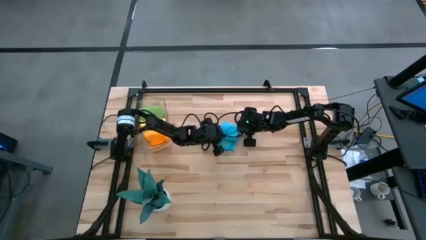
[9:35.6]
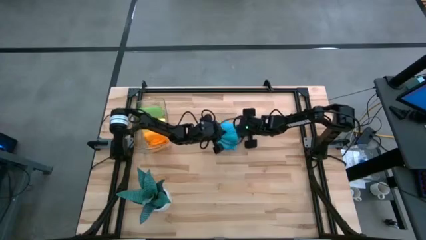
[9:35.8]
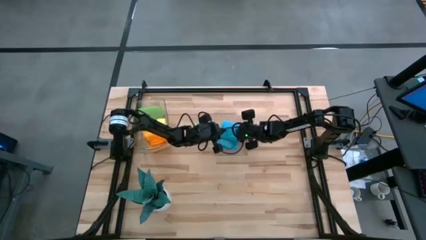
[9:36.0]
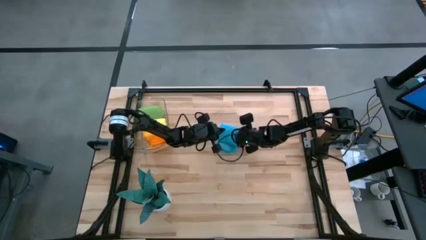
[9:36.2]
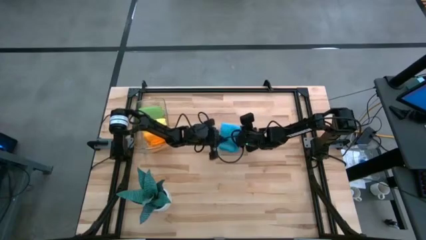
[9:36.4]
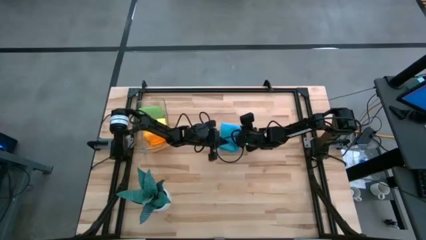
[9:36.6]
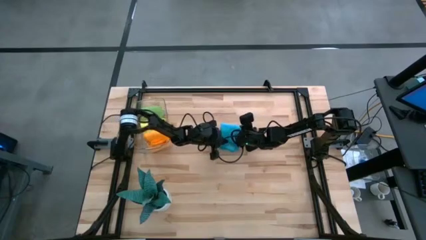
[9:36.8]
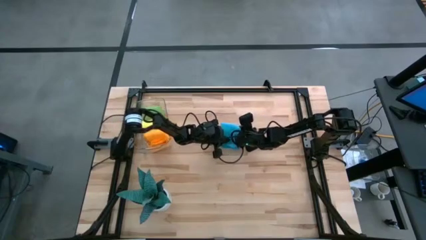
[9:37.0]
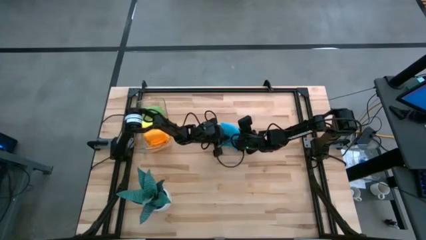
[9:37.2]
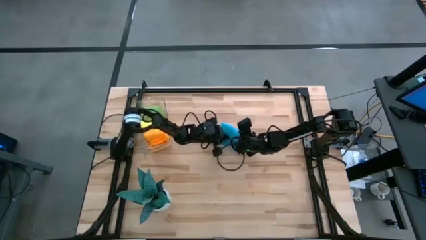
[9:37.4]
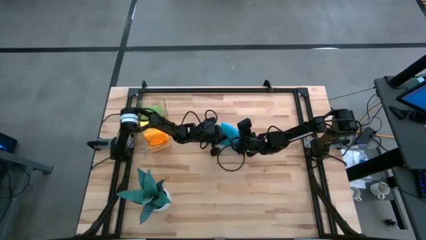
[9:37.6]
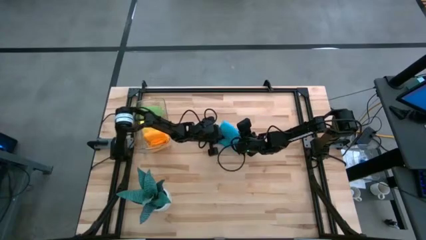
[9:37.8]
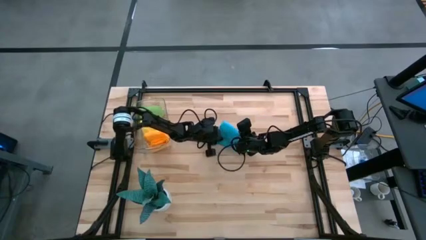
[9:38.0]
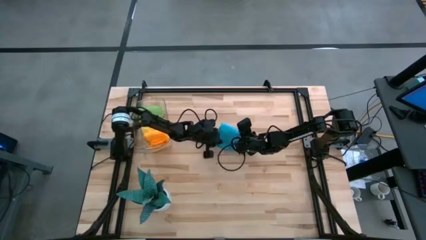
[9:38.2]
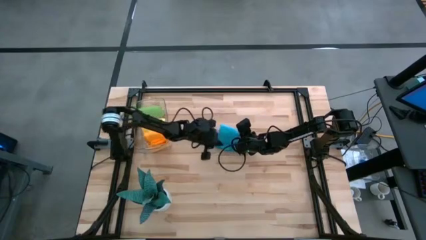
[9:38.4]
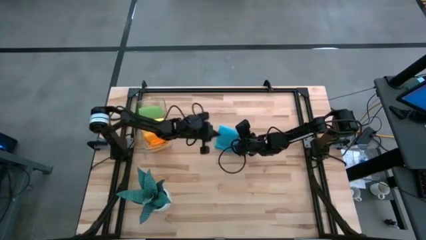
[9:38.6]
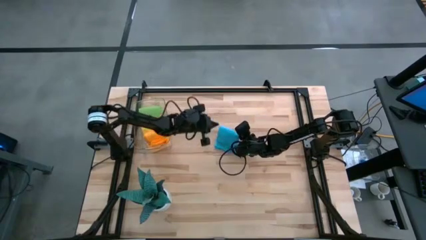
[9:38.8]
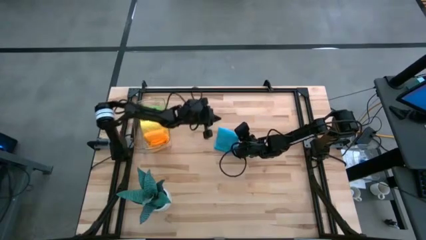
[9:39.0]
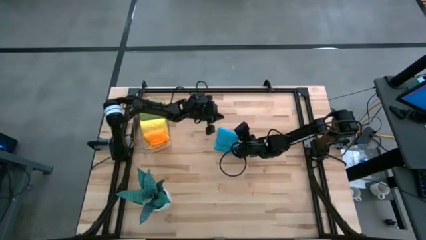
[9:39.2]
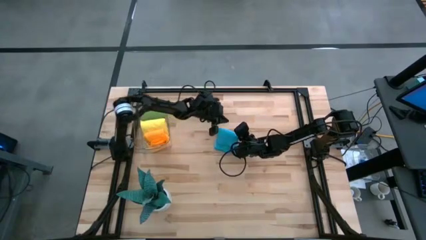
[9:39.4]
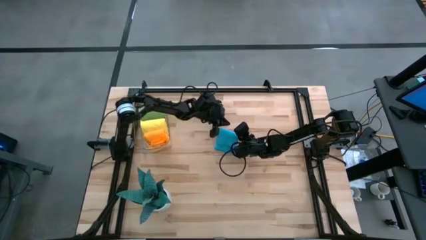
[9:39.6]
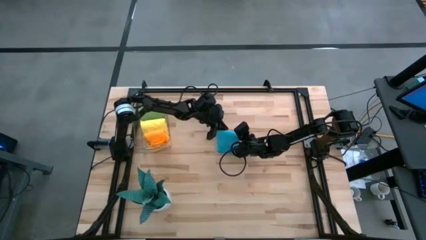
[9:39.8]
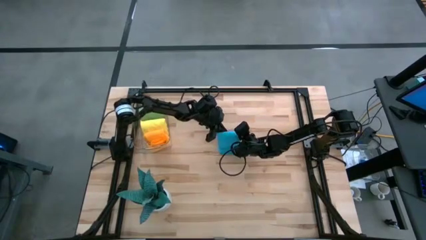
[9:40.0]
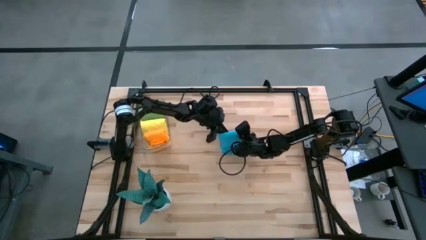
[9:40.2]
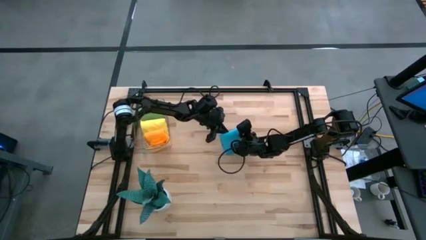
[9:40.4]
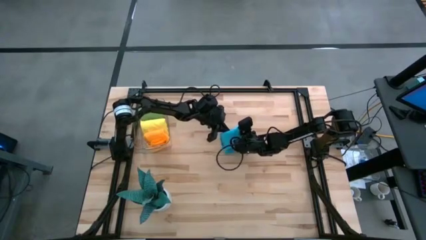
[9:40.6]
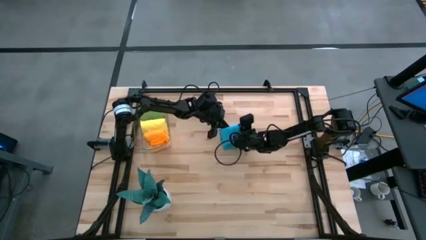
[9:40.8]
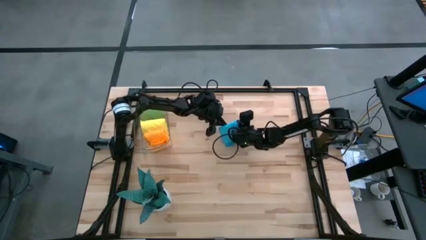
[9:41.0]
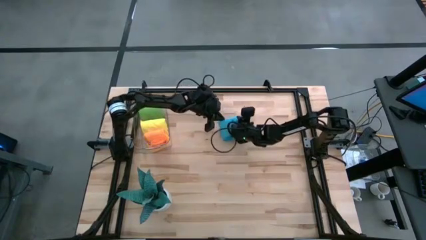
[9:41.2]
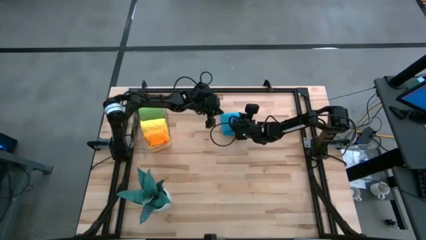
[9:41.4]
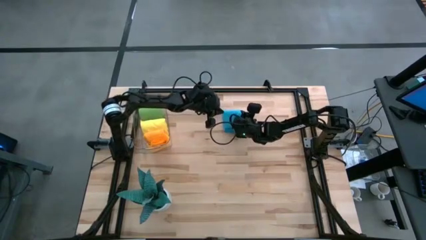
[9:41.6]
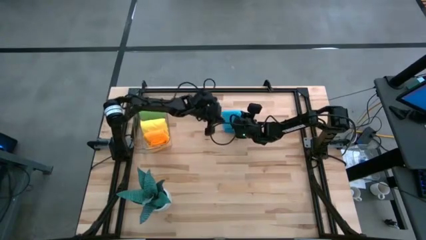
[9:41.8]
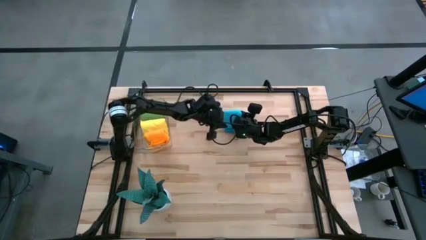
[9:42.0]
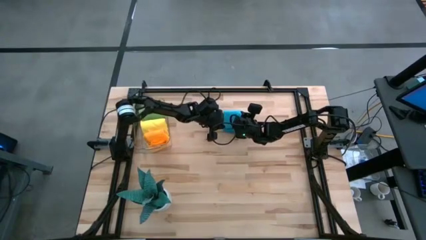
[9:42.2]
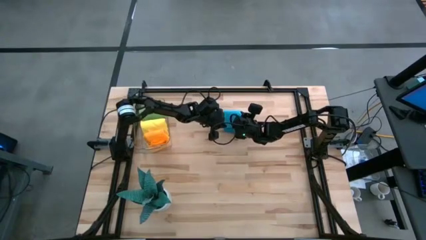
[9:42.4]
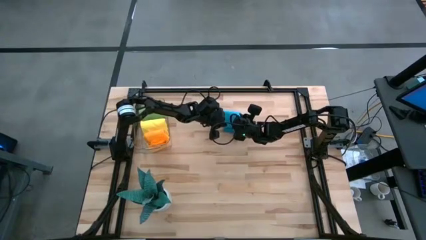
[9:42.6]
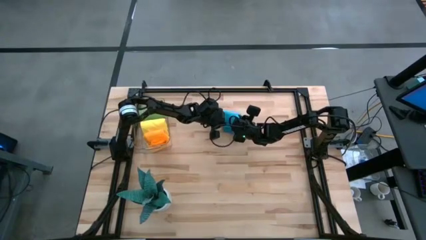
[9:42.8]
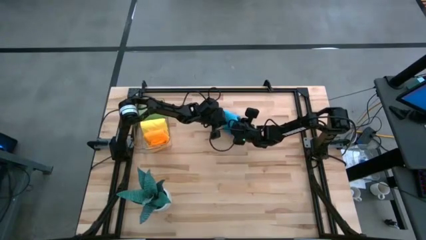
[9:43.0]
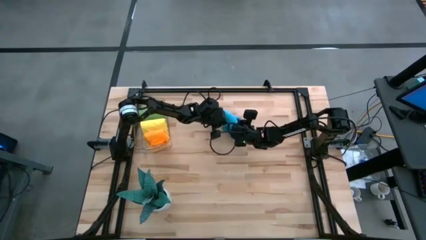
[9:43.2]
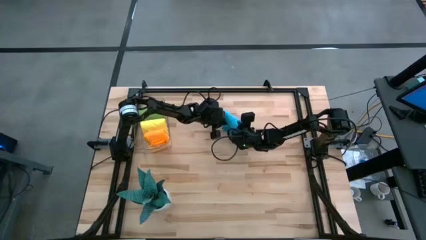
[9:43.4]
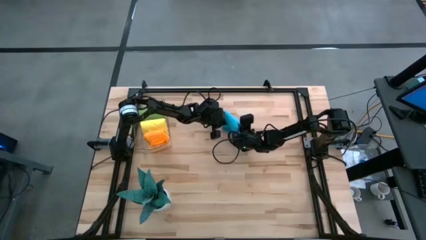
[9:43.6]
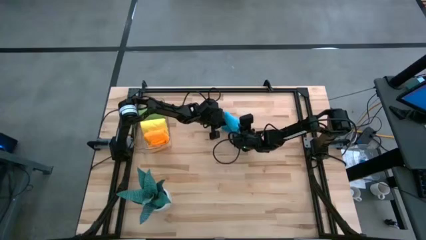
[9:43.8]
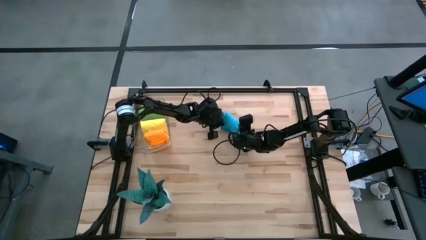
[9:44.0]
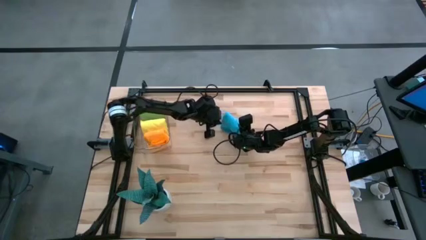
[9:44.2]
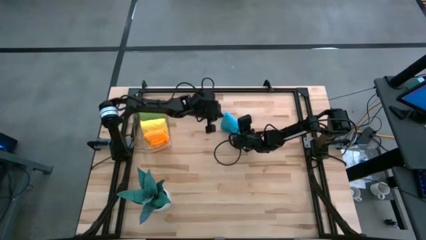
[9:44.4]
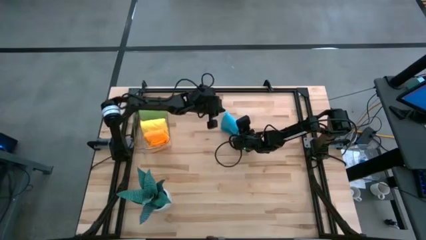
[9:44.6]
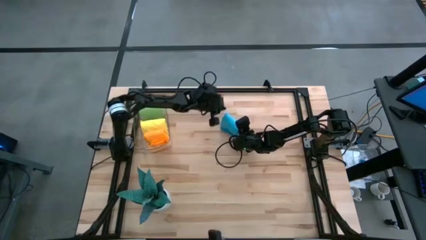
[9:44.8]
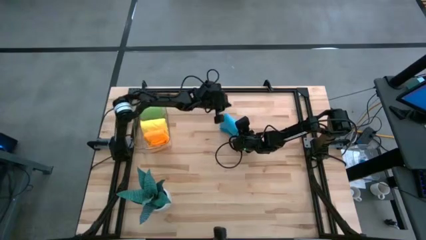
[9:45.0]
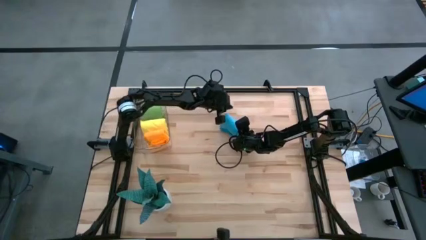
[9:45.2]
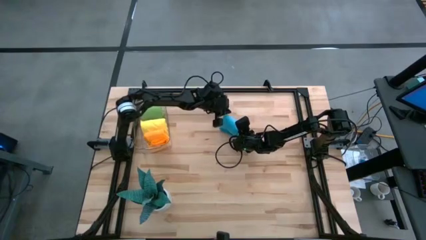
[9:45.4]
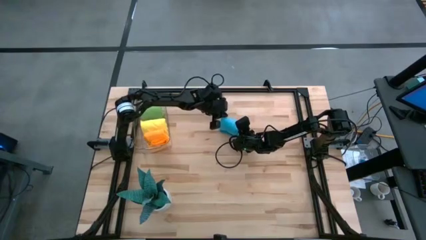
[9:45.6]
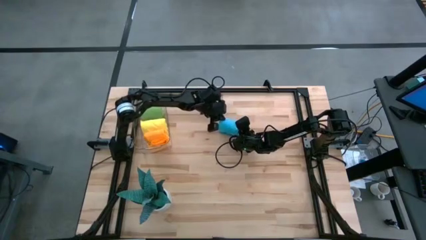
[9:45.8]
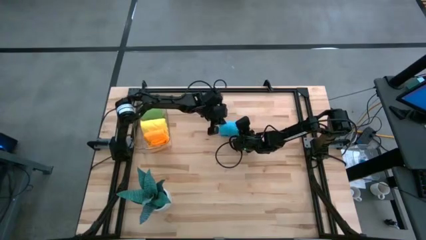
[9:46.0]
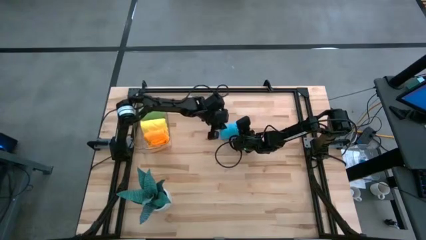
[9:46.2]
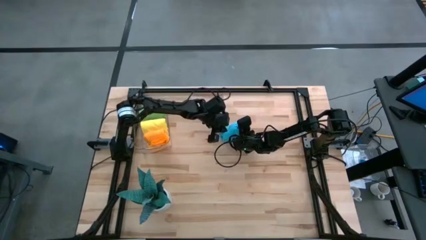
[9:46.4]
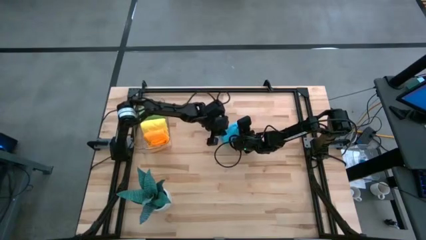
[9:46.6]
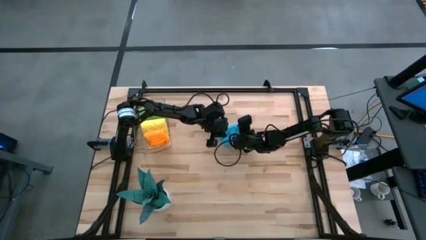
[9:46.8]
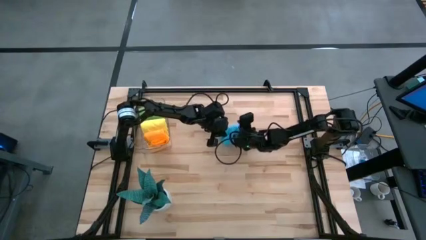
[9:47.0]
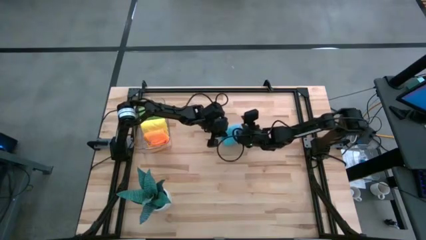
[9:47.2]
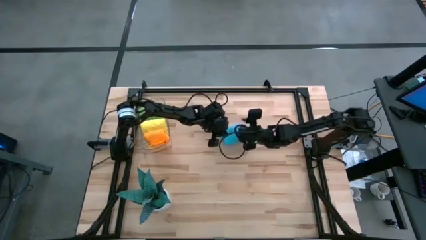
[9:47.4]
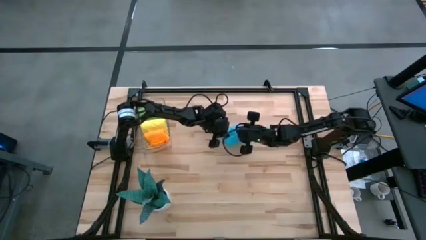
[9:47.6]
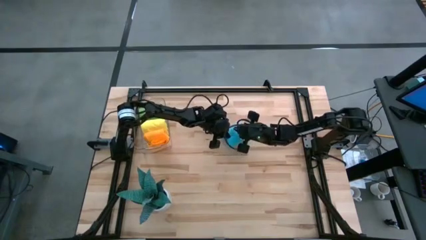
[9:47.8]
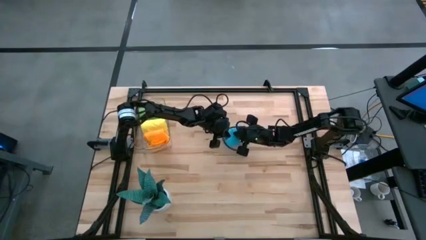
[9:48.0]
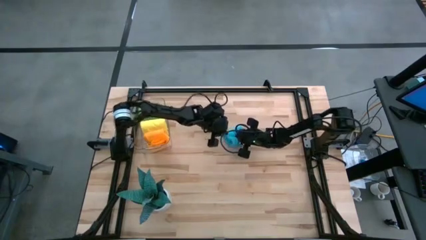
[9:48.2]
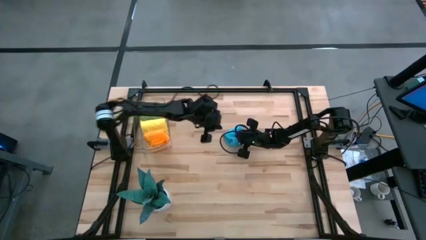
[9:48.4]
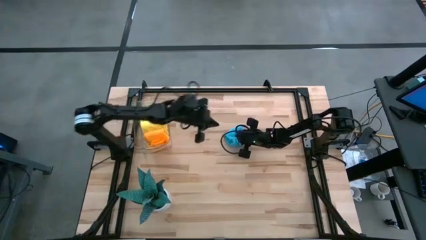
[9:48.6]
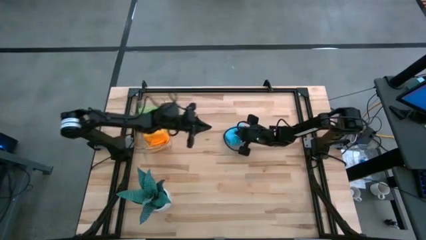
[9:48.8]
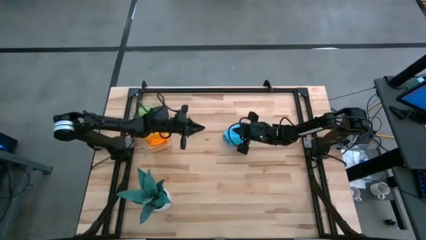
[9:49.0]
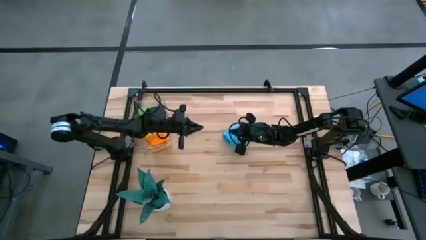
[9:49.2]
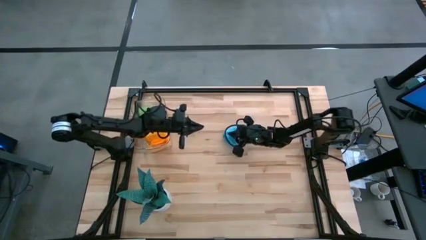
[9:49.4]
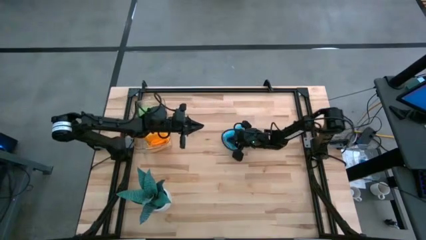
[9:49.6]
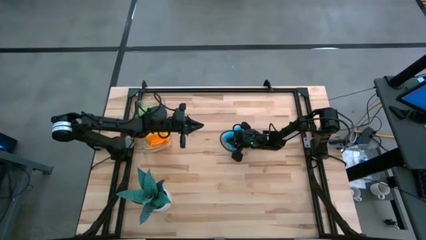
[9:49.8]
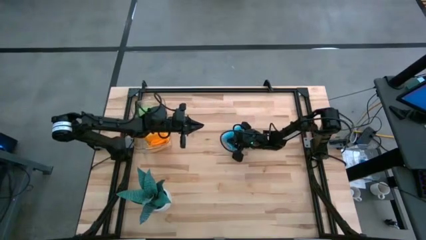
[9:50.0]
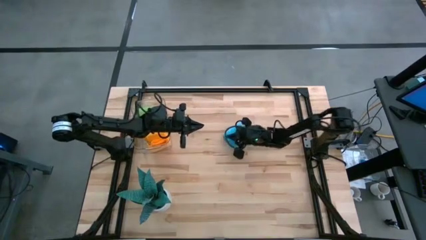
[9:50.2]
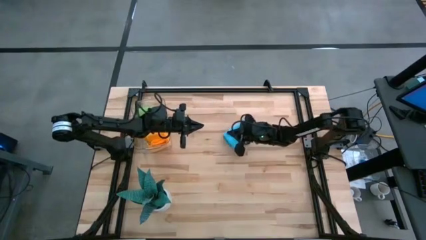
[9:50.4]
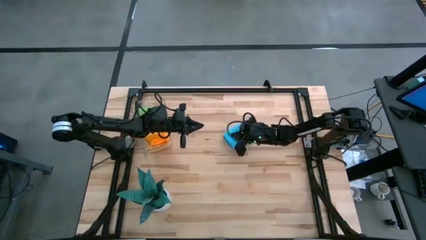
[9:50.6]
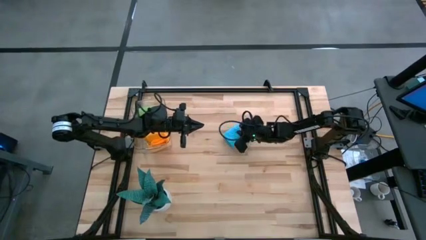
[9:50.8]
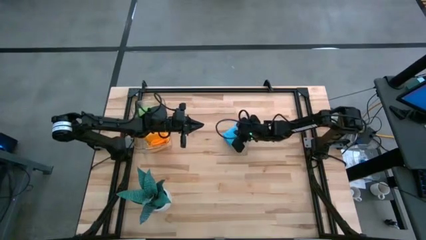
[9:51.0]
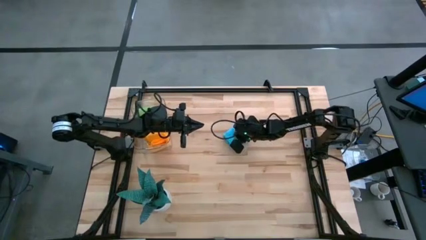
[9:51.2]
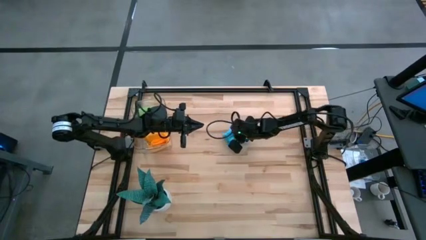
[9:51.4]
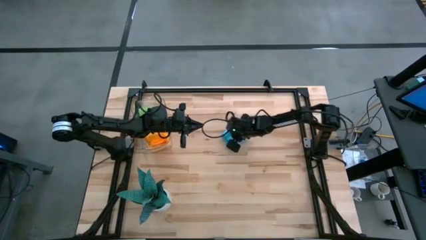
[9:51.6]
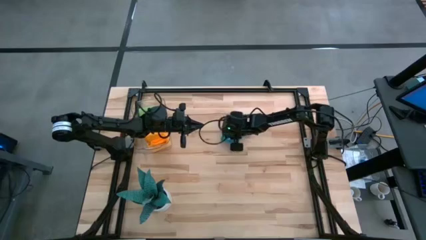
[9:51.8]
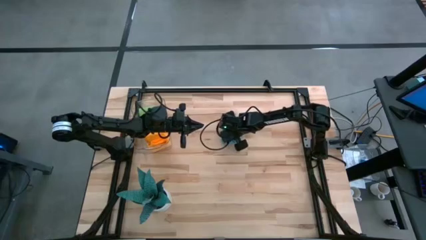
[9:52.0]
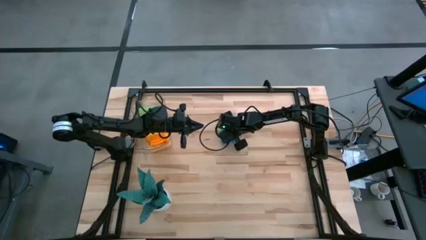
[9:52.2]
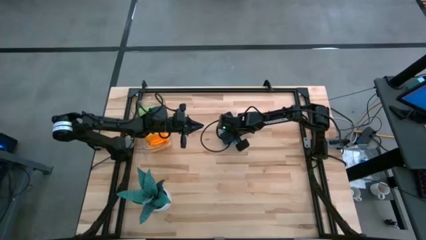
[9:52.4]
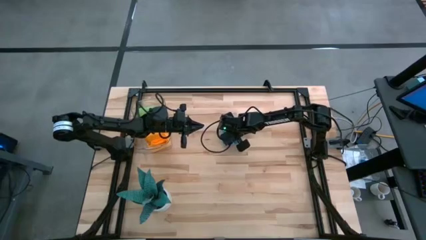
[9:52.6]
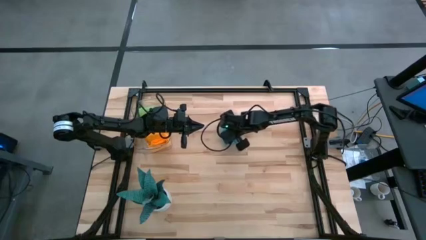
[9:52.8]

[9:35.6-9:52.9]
Task: Roll microfiber towels into tight, uniform cylinder then place into a basket
Roll the blue microfiber towel
